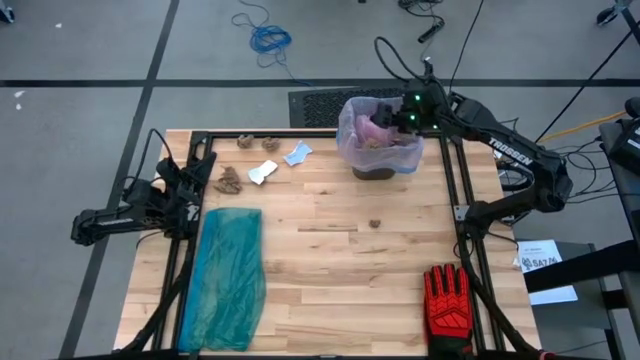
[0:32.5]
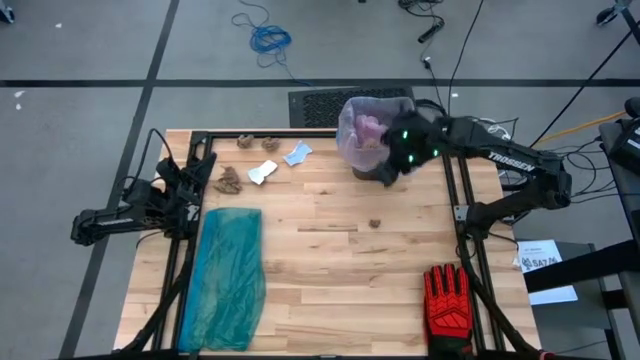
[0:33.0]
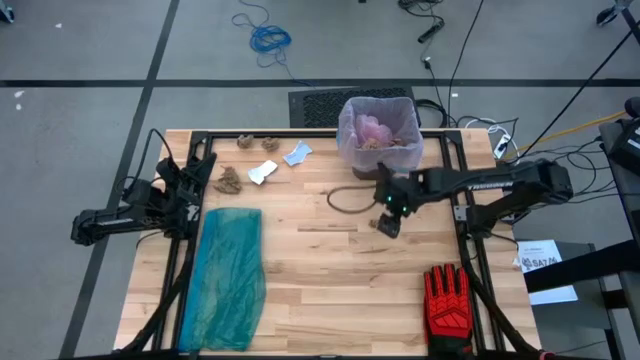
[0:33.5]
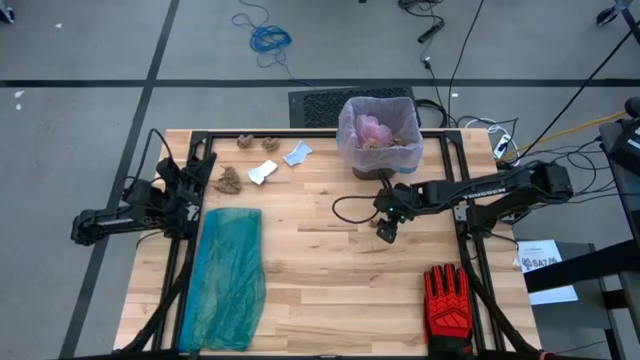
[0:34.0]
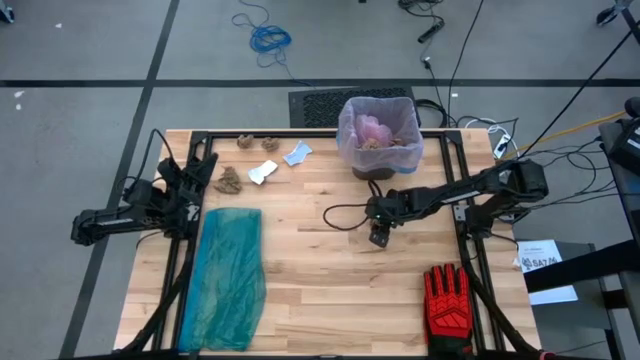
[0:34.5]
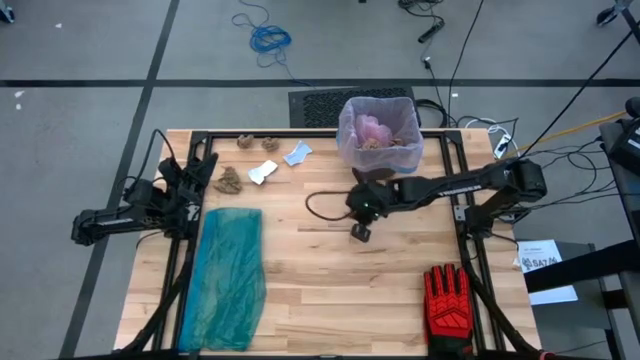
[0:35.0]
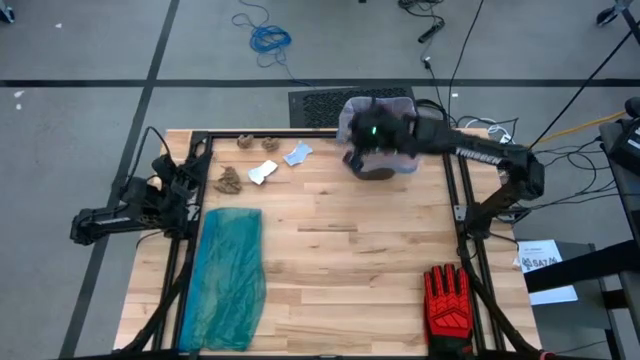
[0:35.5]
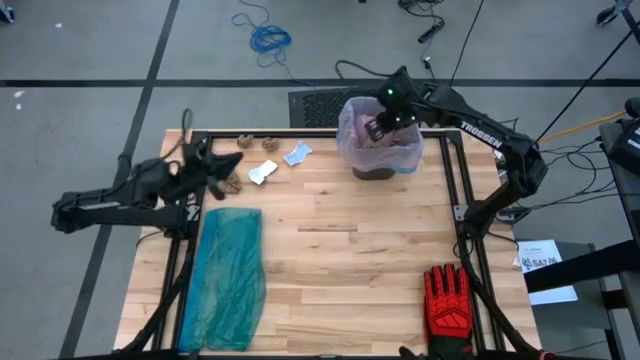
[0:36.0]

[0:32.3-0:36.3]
Task: place trash/remove bag and relplace
Put the brown napkin into the trash bin

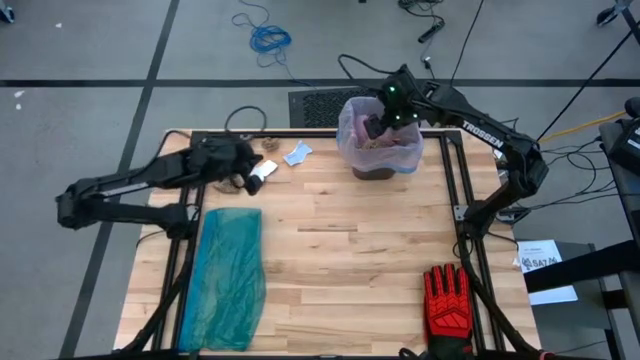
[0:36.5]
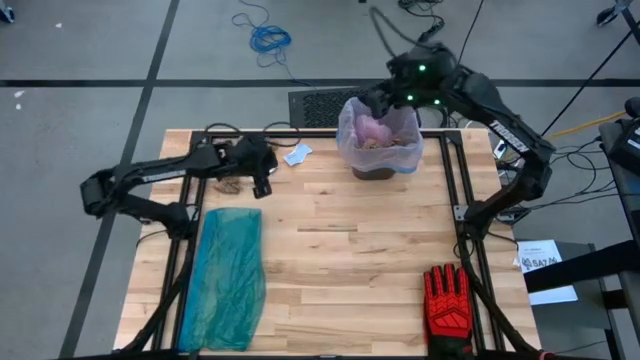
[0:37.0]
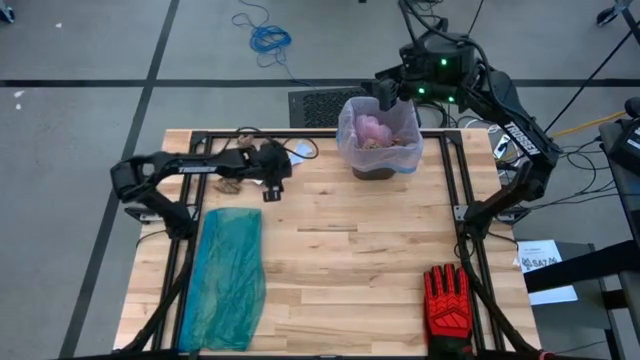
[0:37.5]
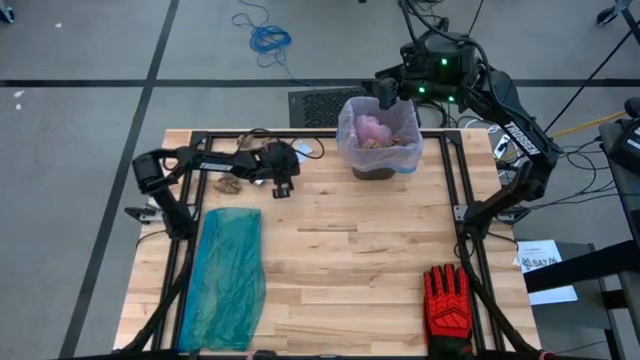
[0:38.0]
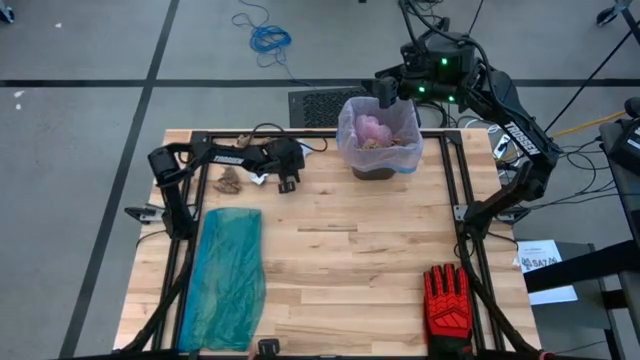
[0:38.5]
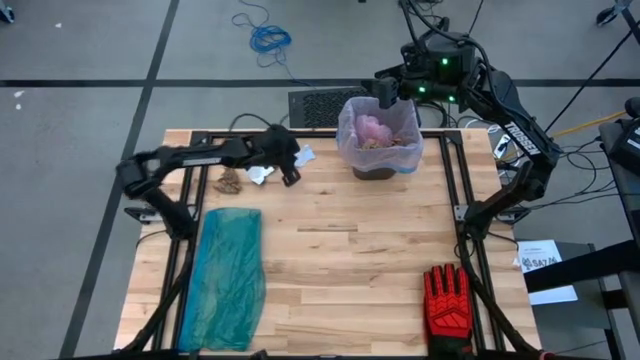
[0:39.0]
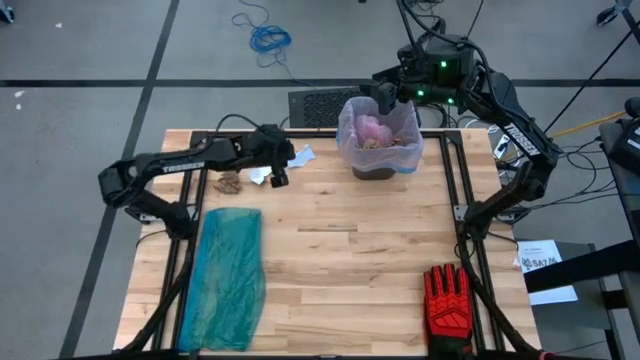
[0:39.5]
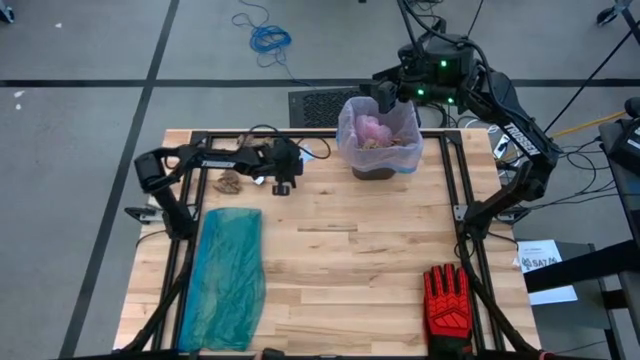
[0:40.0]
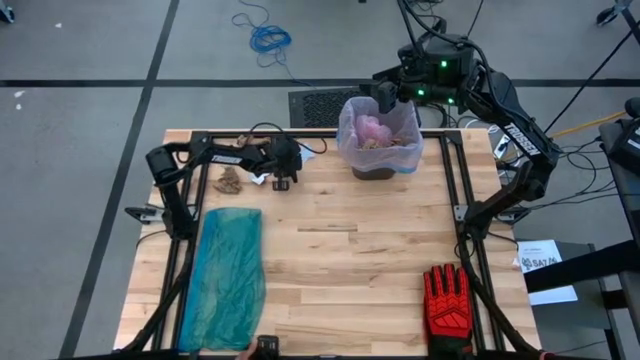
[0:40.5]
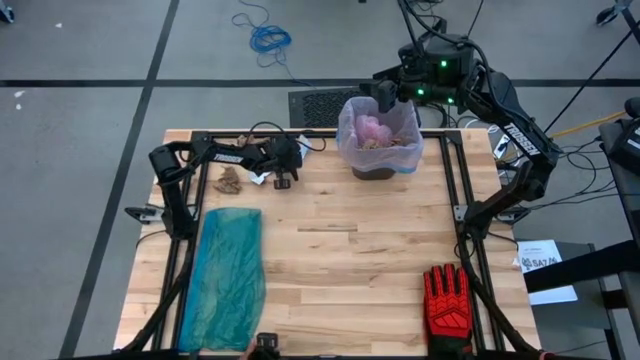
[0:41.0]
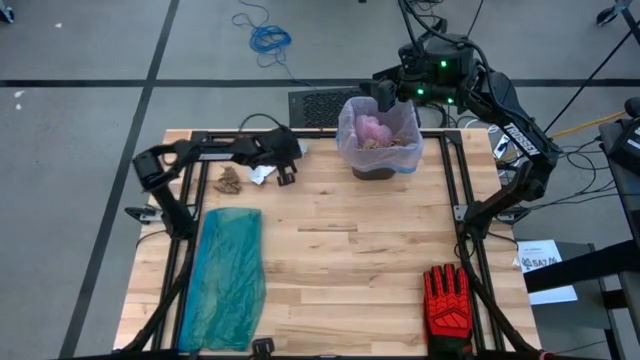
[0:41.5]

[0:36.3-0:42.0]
Put the white paper into the trash bin

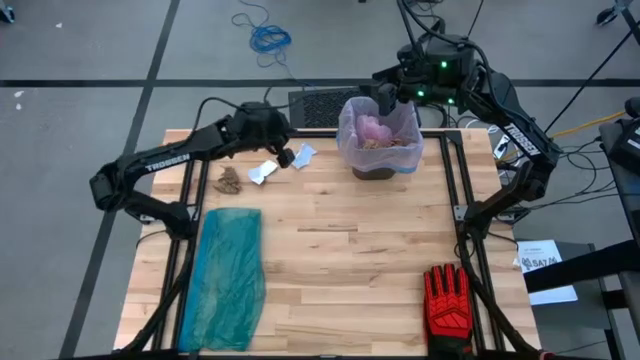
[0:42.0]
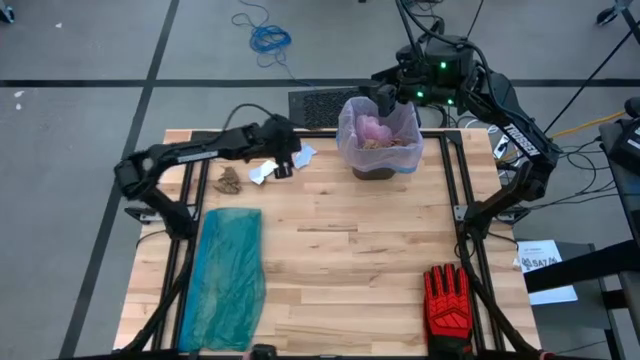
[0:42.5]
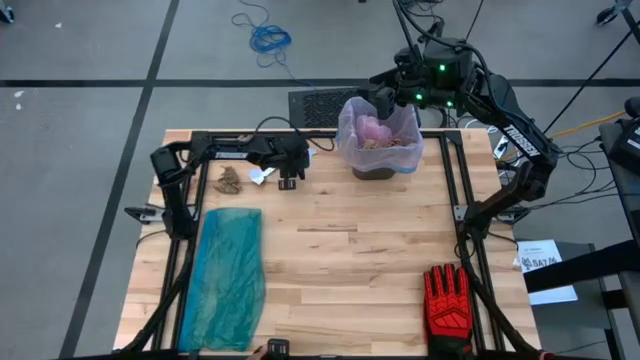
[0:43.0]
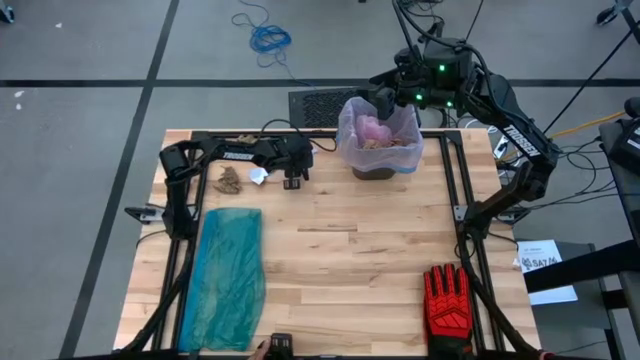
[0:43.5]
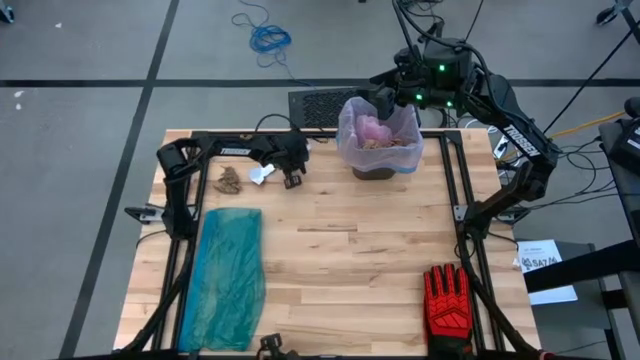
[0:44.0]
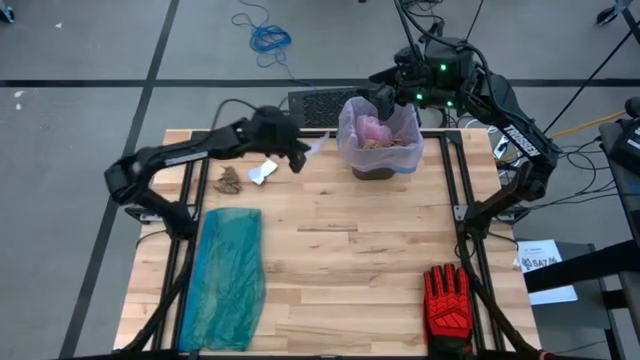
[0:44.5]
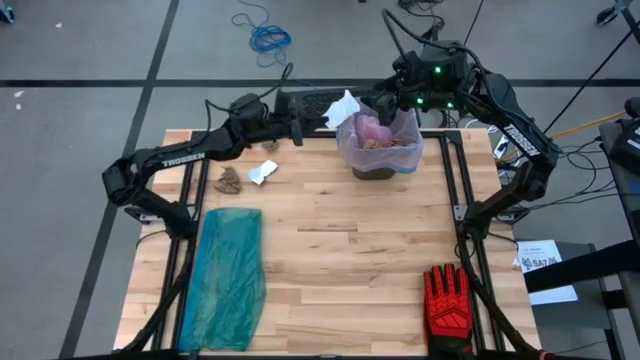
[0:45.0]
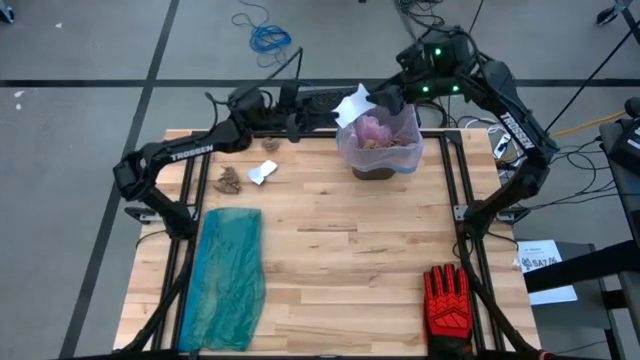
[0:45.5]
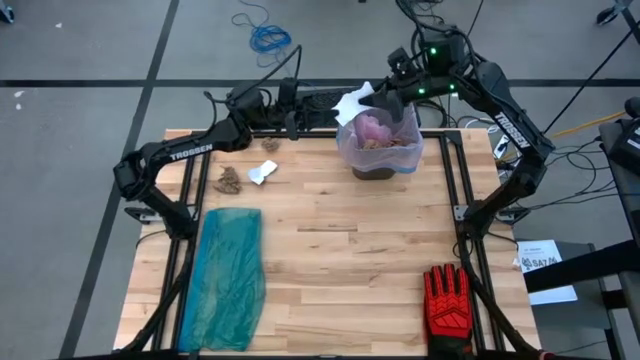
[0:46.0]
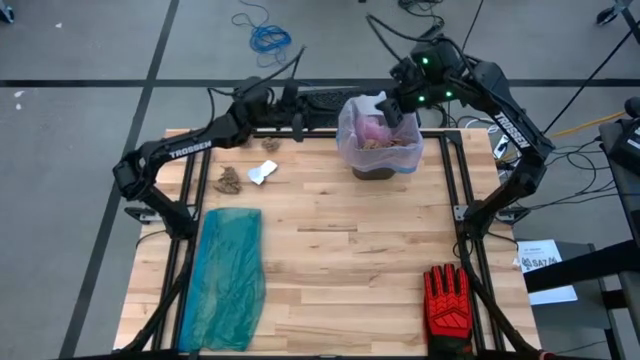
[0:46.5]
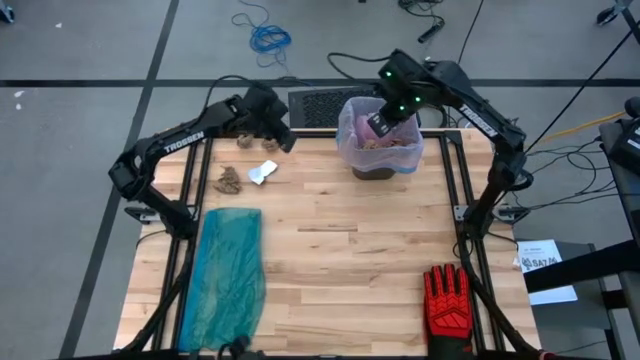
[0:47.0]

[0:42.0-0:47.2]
Put the white paper into the trash bin

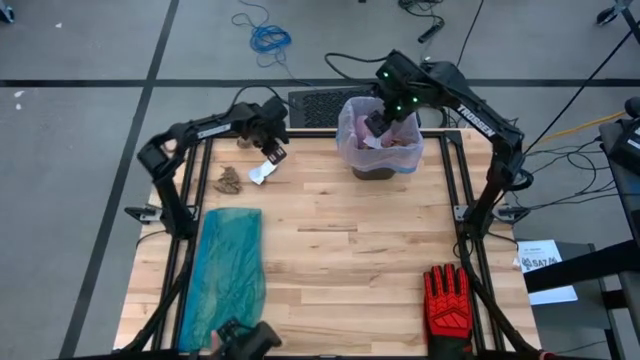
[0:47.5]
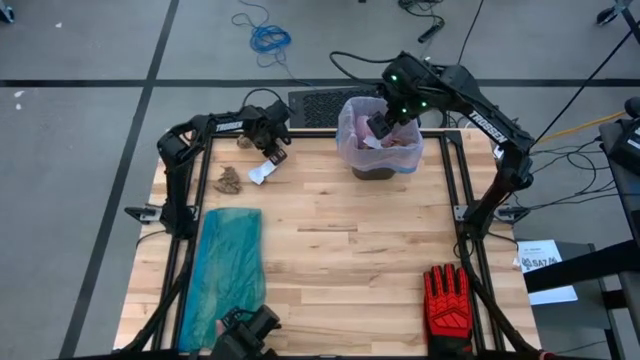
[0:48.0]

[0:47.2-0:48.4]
Put the brown napkin into the trash bin

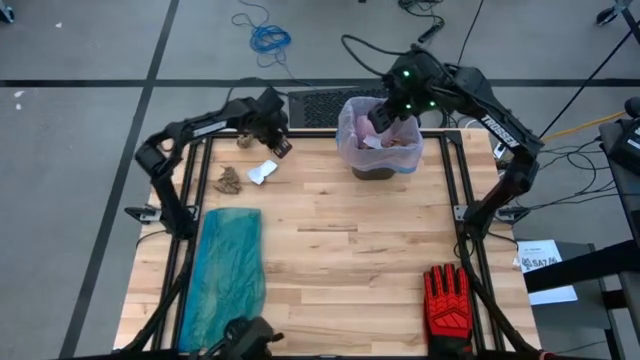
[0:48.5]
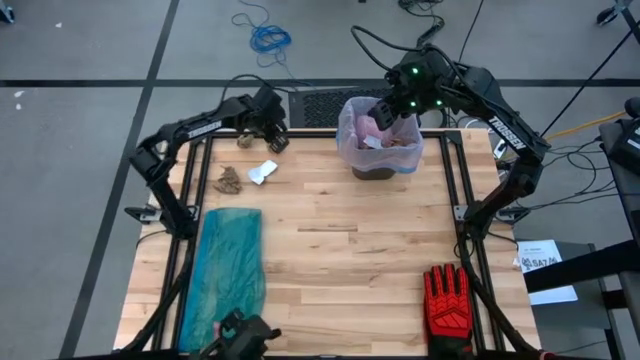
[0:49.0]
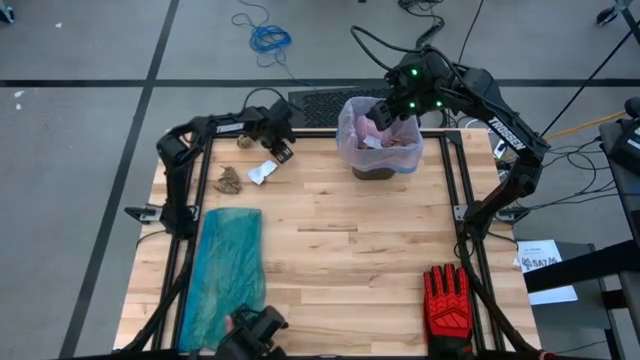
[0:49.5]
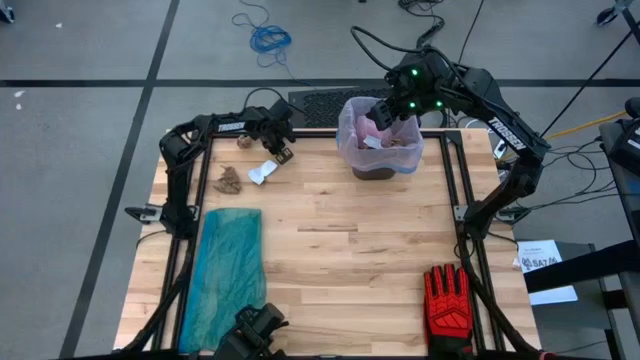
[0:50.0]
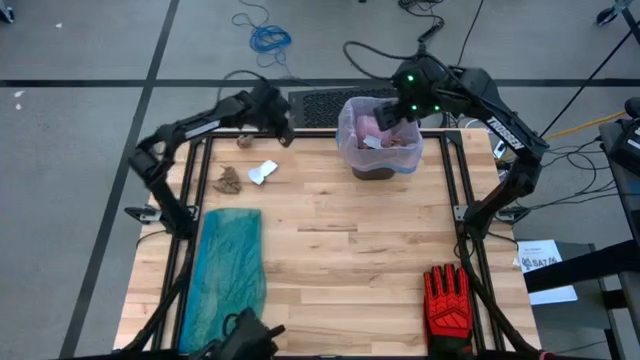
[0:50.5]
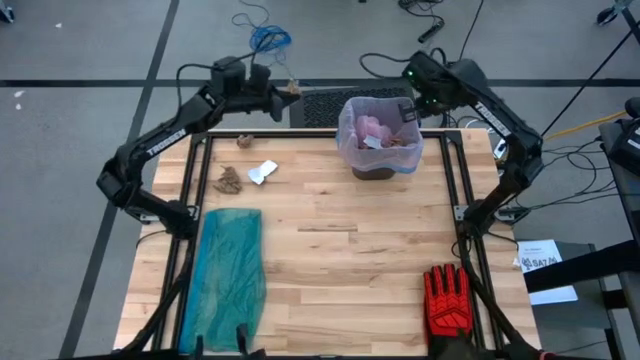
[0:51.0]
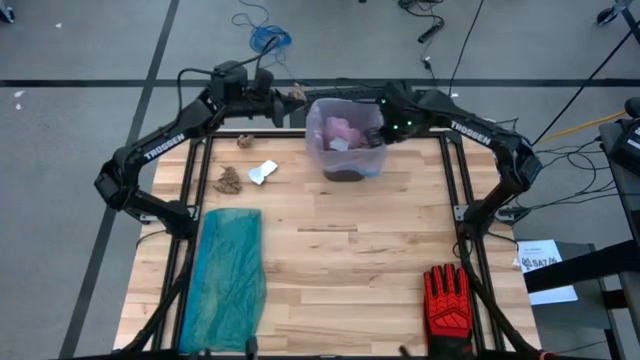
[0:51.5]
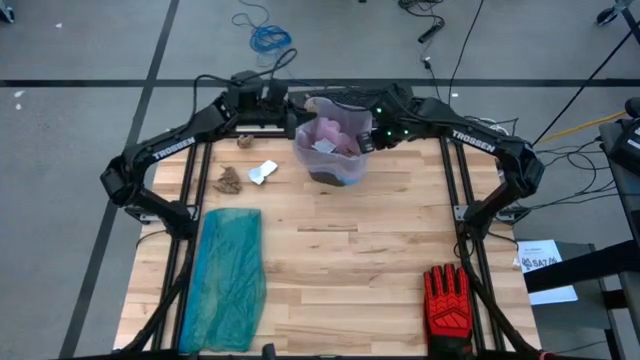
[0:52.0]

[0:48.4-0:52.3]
Put the brown napkin into the trash bin

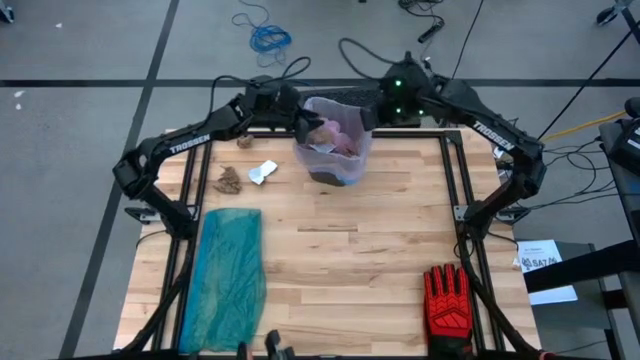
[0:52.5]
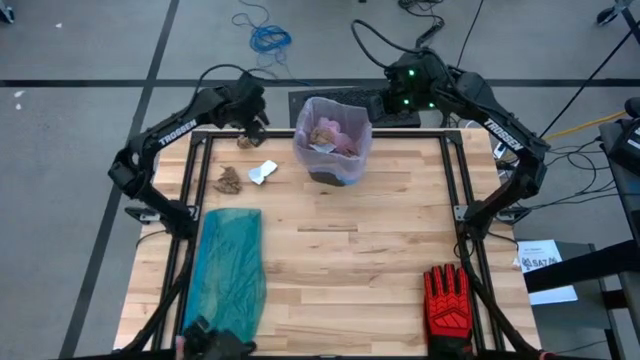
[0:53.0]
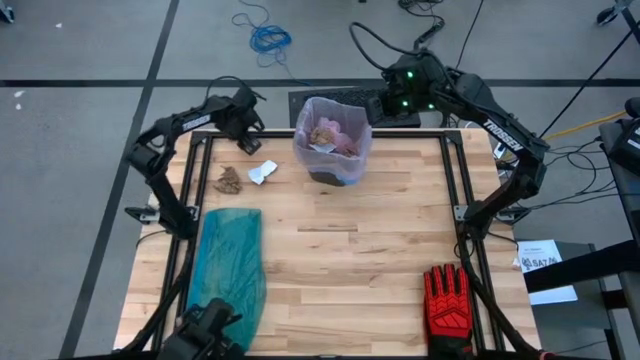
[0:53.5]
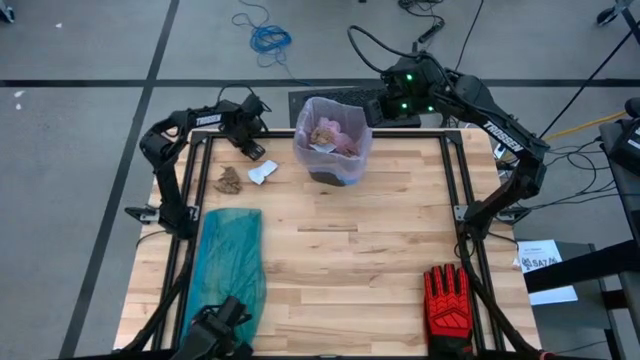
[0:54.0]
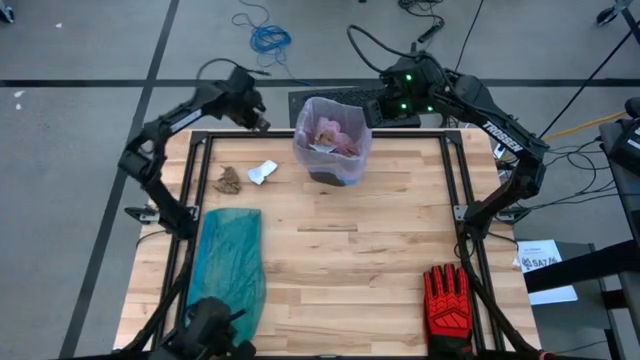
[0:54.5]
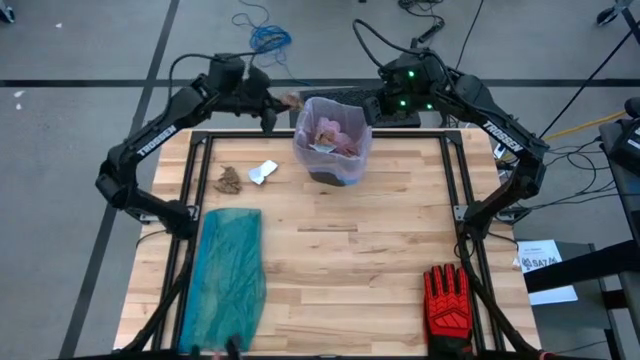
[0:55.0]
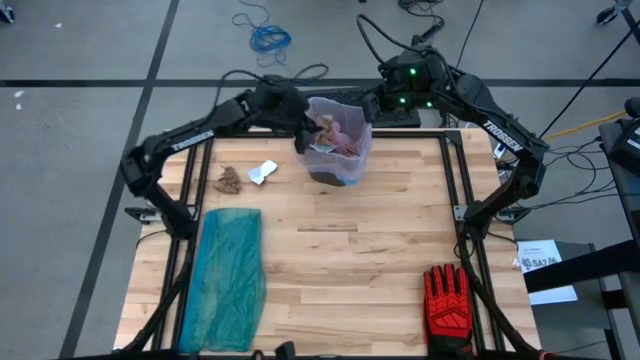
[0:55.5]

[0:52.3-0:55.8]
Put the brown napkin into the trash bin
